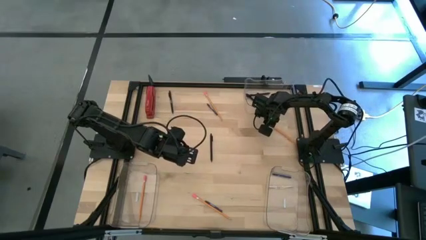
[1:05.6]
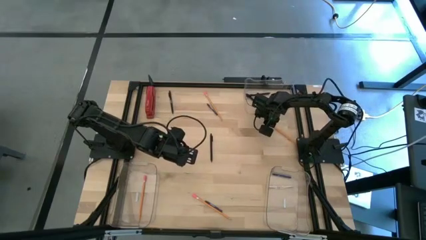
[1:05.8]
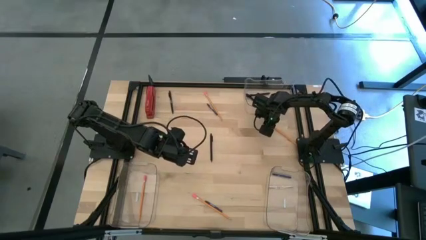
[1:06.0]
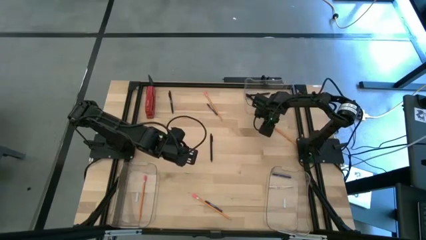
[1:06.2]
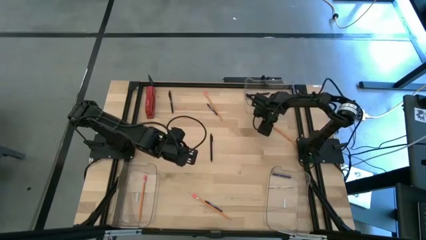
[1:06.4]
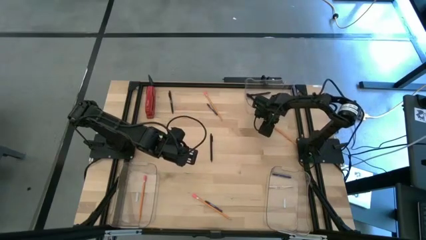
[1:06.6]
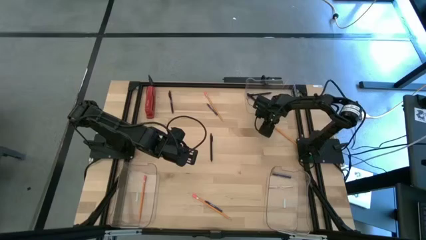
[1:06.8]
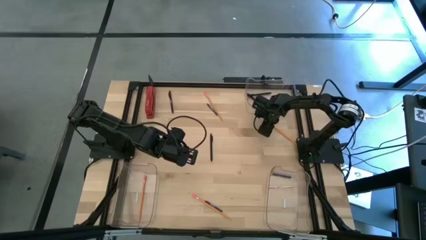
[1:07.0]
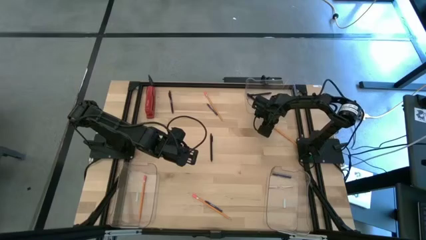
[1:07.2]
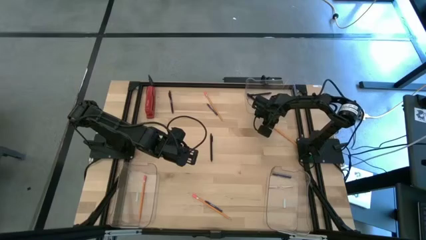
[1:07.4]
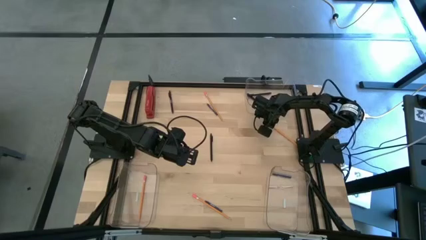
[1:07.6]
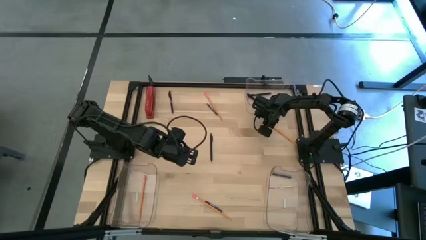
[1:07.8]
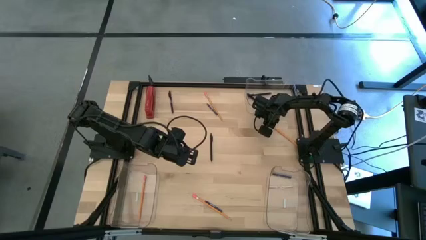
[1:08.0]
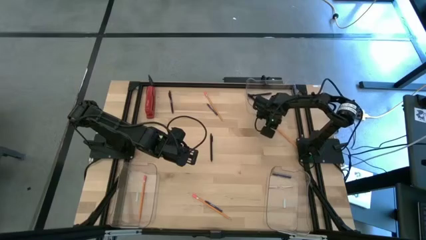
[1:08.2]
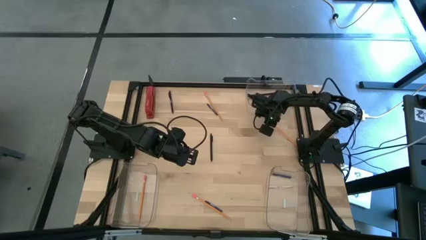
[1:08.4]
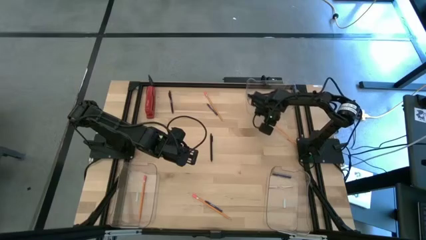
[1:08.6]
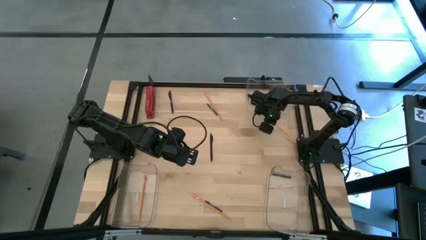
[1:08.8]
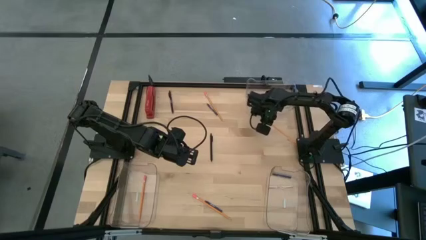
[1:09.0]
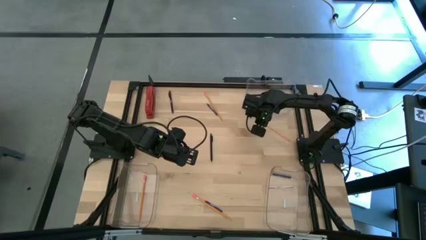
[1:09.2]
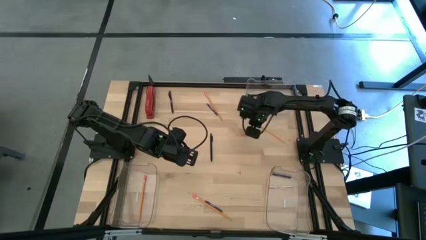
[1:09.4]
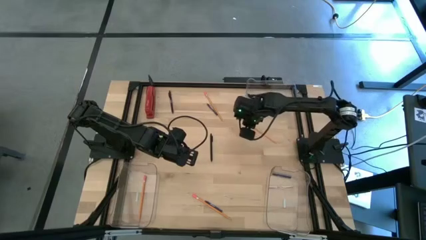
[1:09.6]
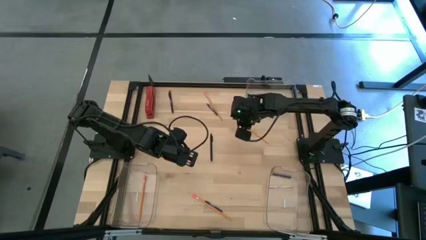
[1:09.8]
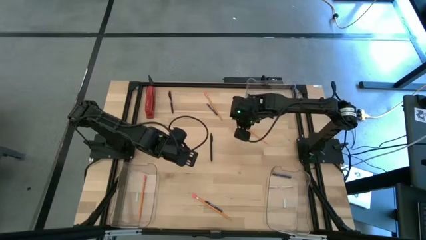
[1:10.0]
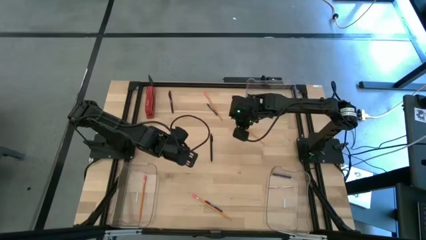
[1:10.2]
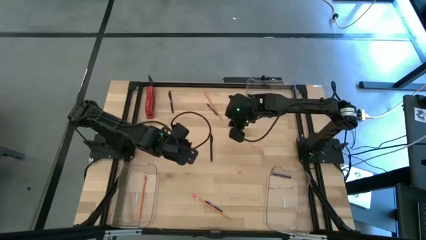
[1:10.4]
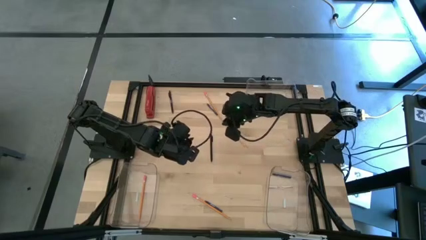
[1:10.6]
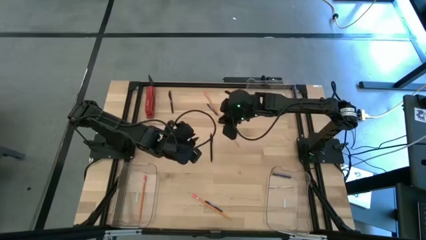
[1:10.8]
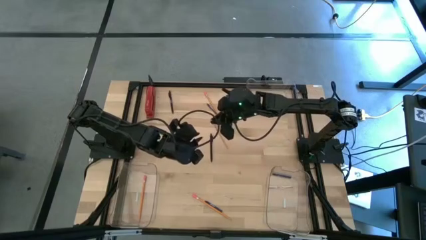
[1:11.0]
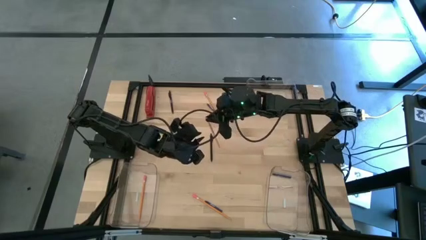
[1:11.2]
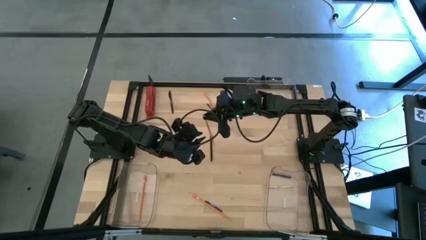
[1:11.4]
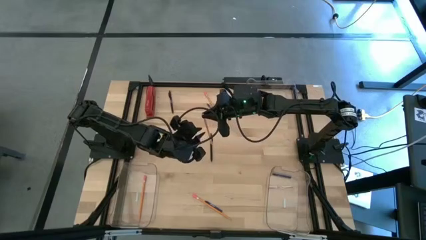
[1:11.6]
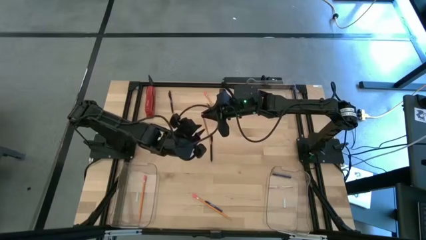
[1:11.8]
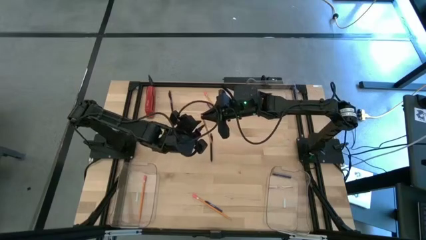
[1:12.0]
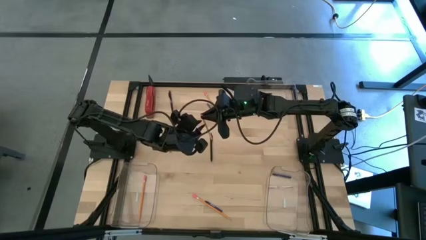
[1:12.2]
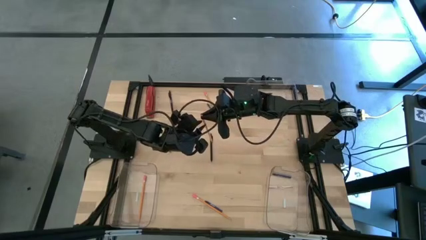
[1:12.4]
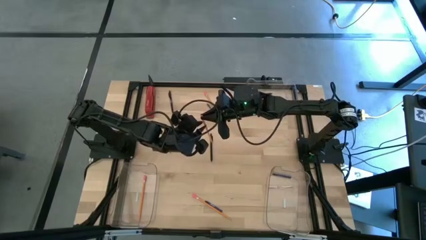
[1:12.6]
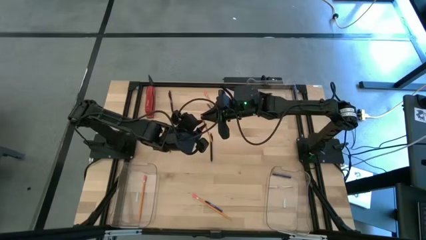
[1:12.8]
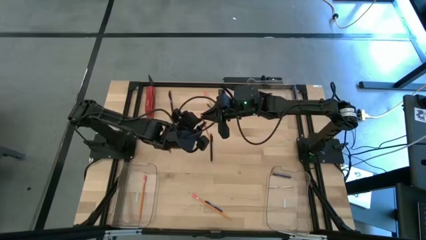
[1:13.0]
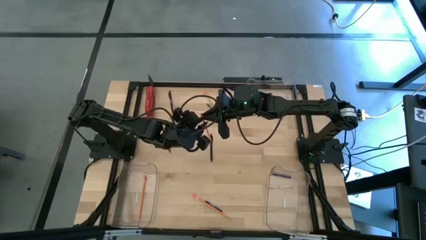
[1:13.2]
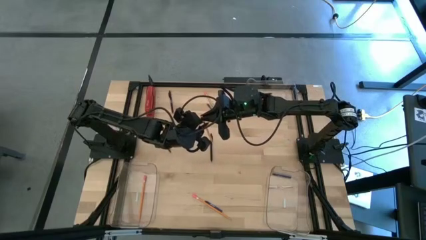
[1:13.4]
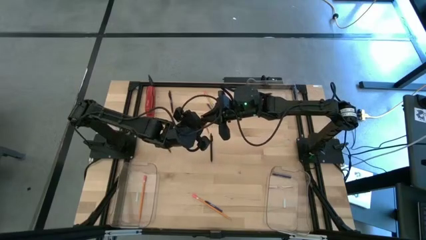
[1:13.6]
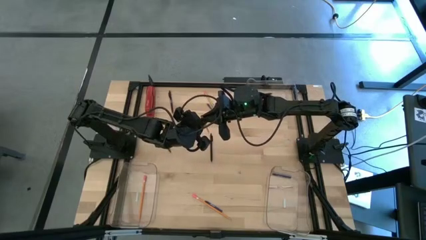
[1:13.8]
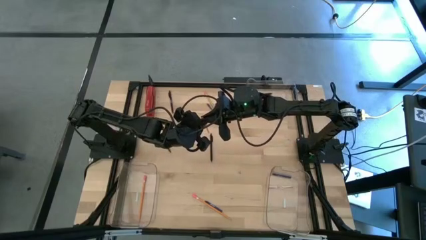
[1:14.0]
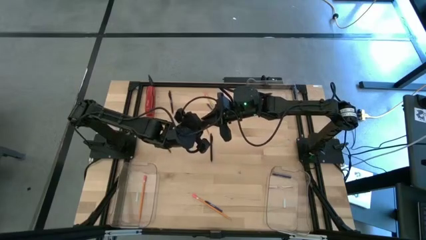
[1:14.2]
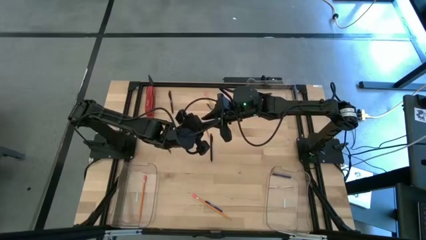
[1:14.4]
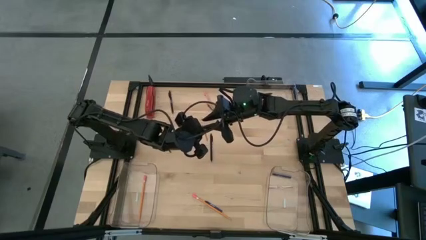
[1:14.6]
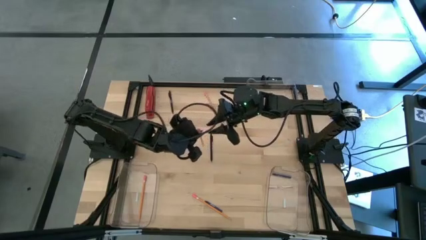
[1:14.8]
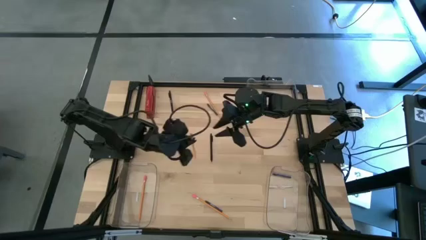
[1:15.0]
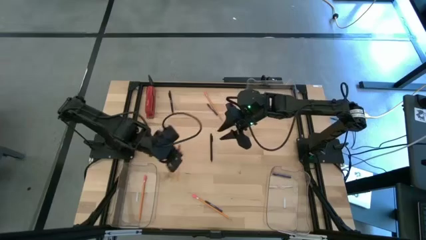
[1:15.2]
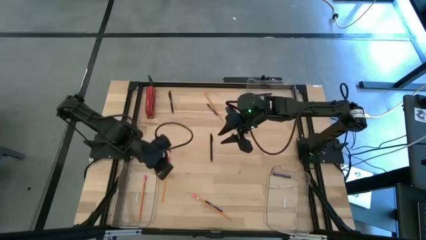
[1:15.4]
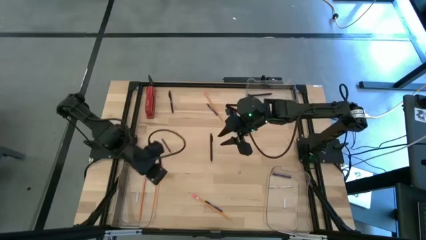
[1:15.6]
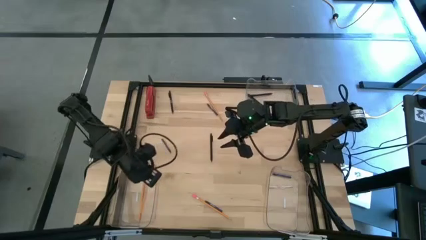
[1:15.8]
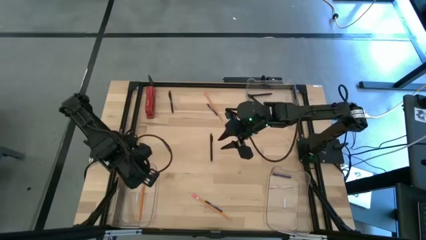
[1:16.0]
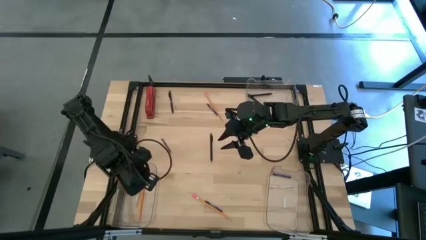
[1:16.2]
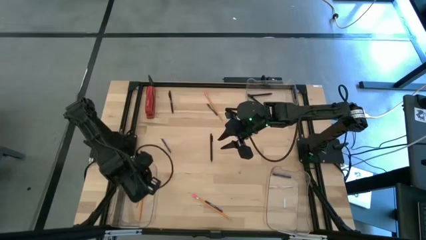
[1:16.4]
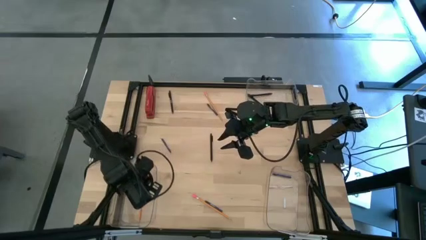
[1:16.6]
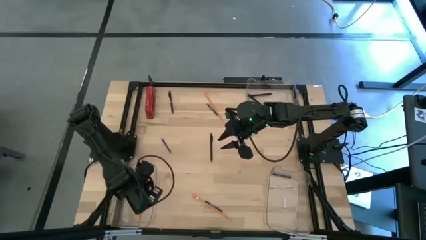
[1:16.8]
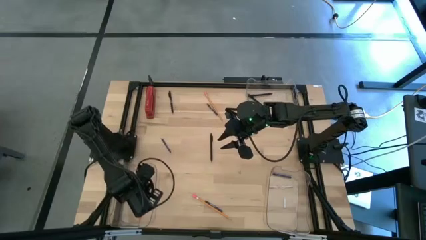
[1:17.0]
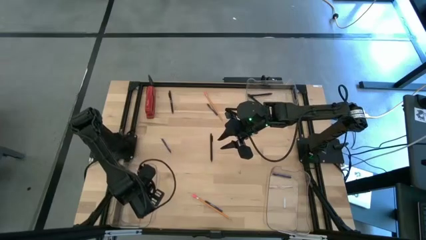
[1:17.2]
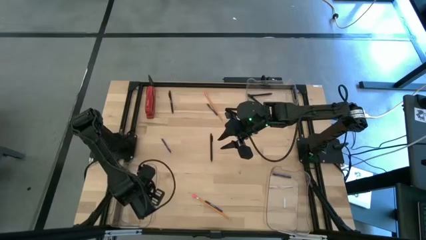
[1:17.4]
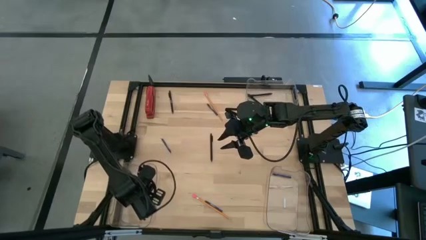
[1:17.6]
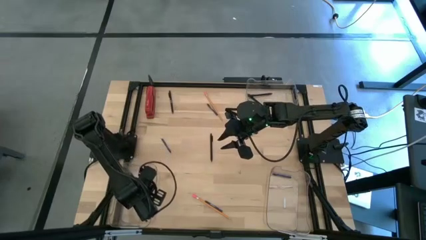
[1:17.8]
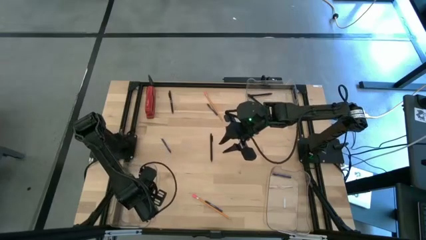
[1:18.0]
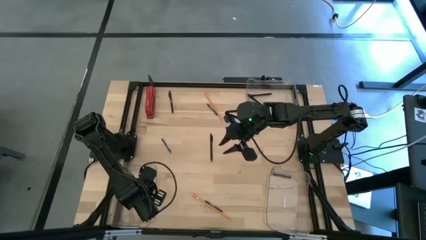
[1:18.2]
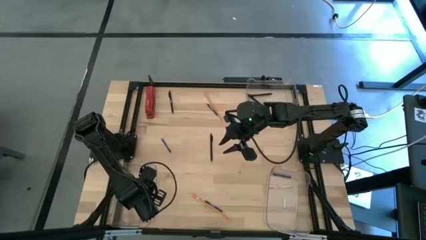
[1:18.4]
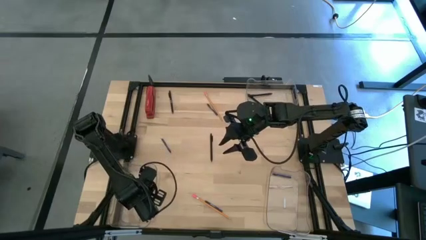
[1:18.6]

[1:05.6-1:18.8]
Task: Sort crayons/erasers/pens/pencils in bins
Put the yellow pencil into the bottom left transparent bin
